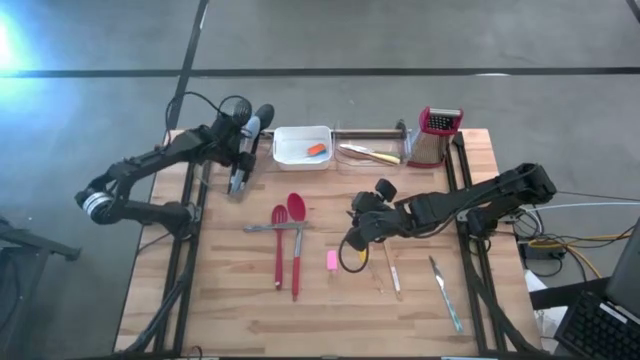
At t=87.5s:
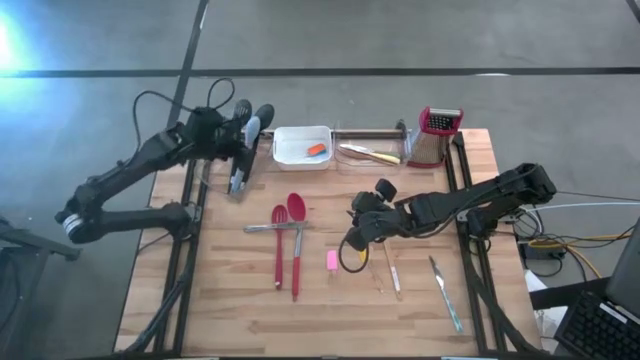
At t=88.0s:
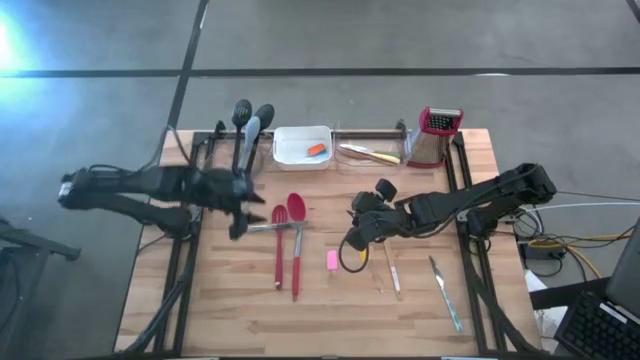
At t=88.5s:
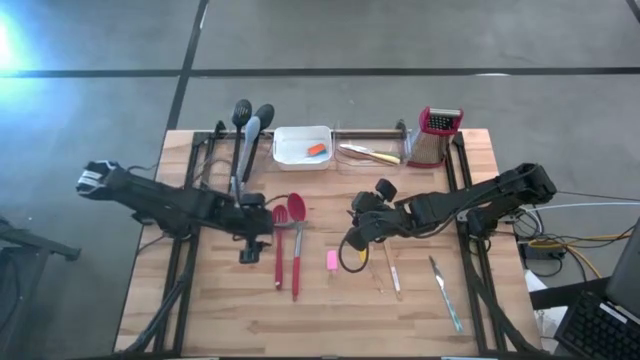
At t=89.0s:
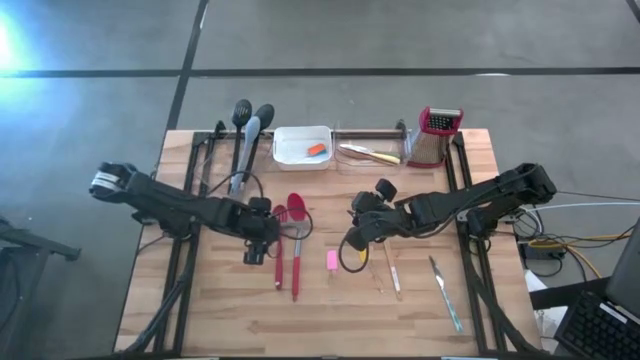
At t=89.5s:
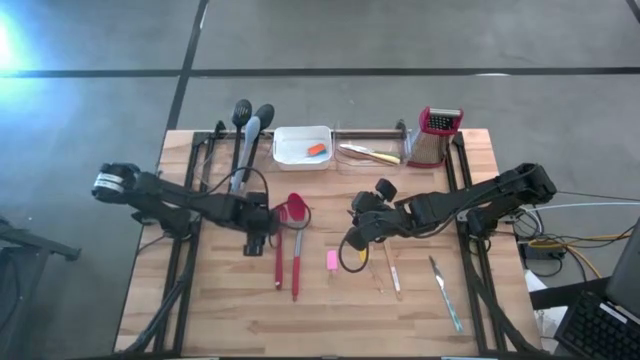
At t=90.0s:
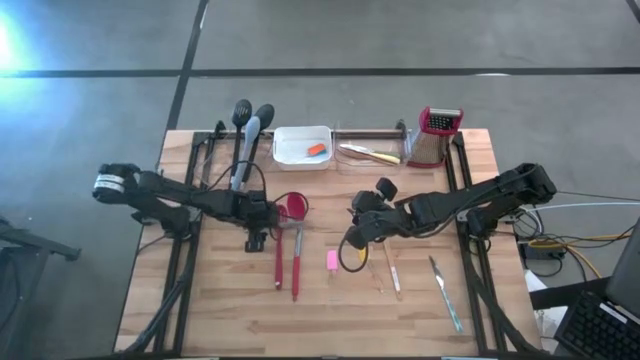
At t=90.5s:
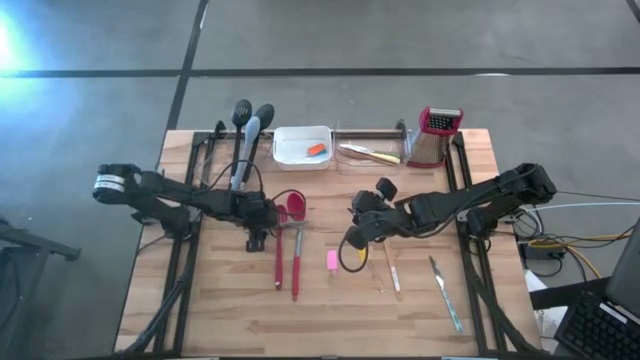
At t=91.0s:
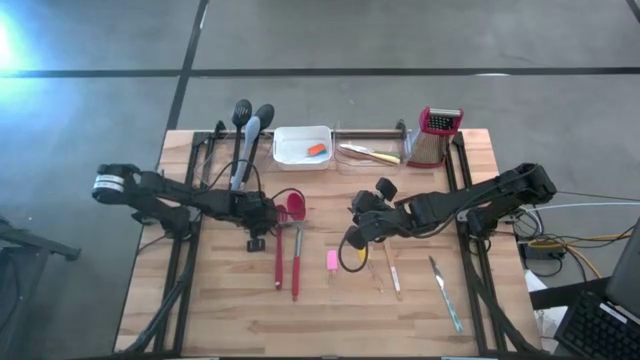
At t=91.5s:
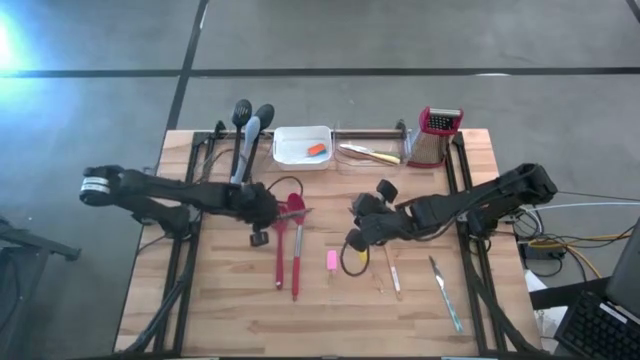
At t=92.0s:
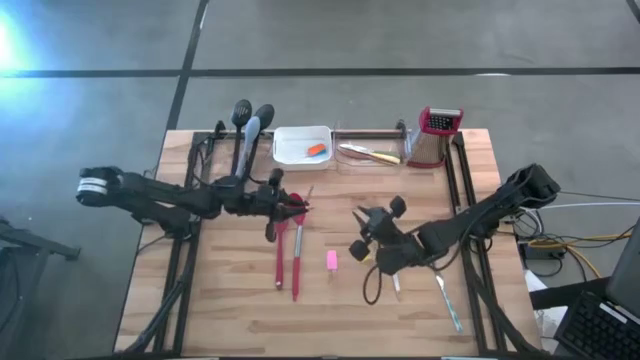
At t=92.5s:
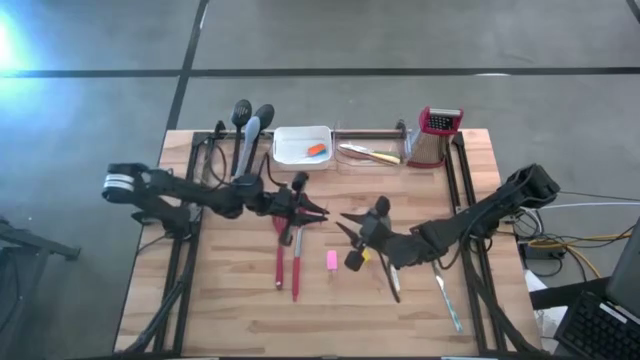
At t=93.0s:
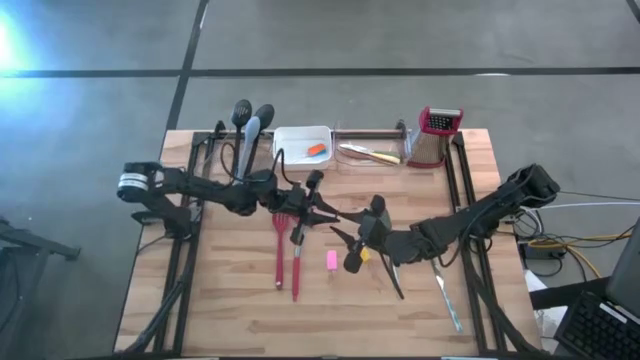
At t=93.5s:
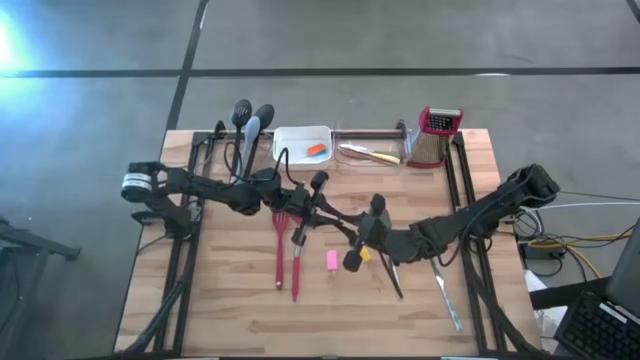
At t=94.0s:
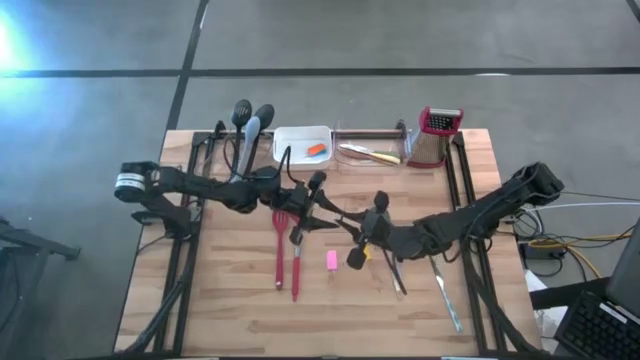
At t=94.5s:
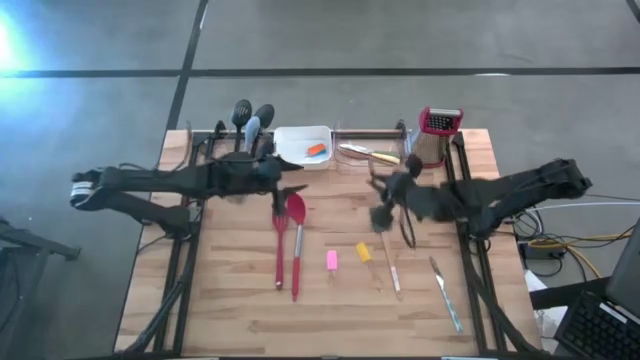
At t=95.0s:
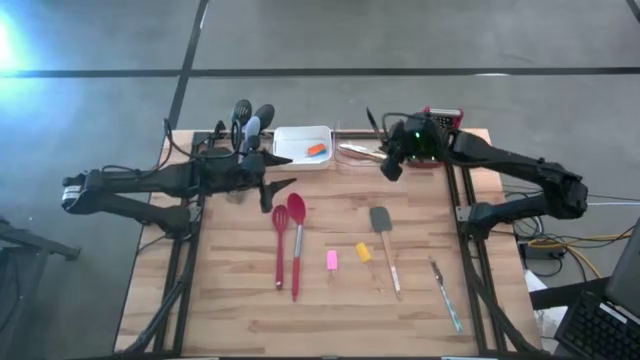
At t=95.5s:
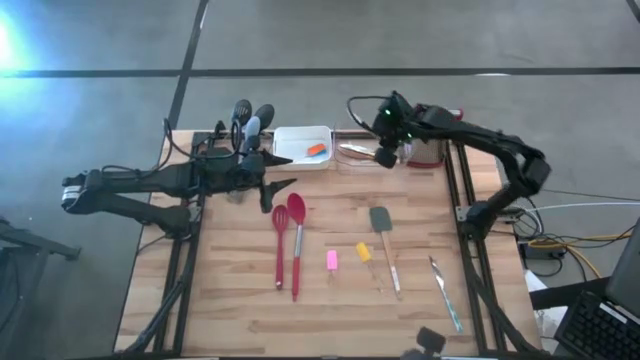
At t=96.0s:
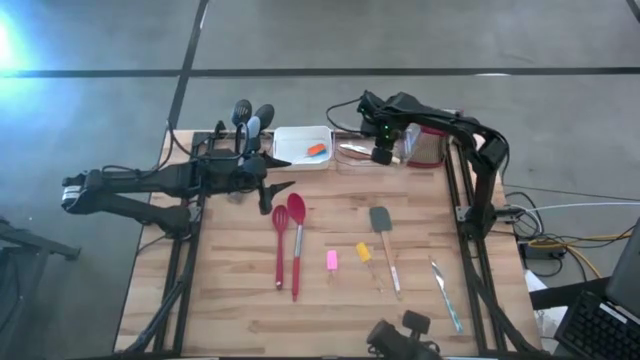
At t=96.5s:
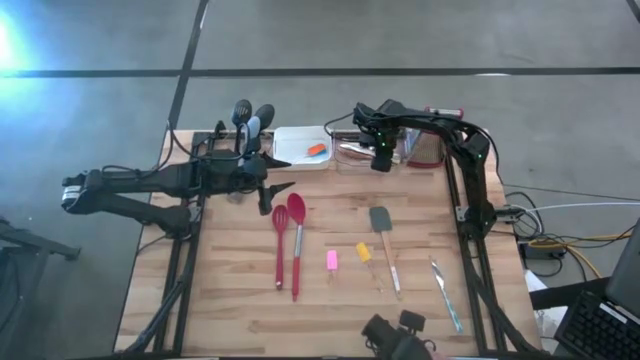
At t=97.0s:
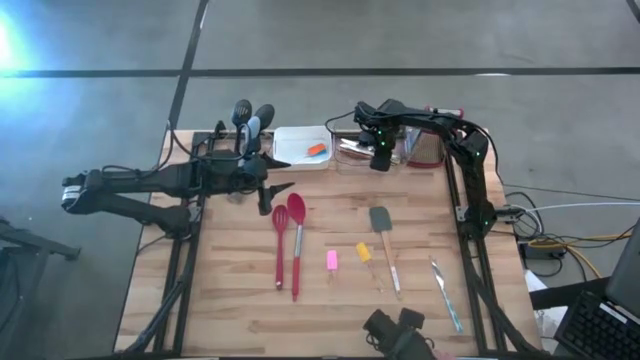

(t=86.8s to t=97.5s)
Task: Pick & Place Kitchen Items
Put the silver knife into the right transparent bin

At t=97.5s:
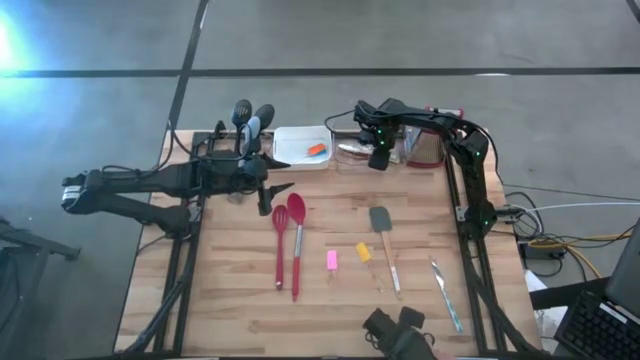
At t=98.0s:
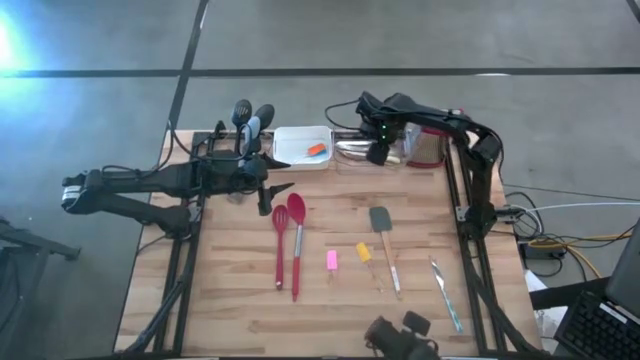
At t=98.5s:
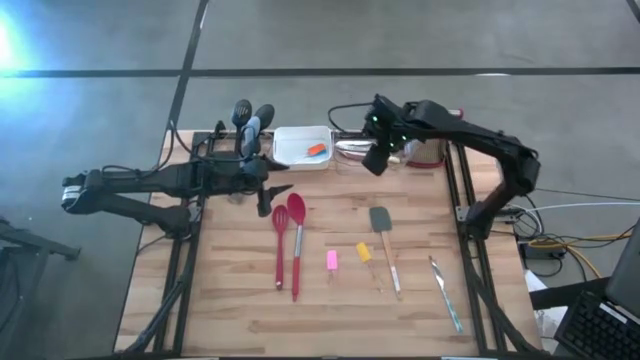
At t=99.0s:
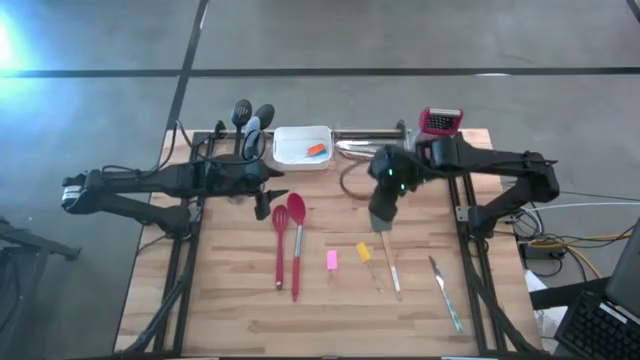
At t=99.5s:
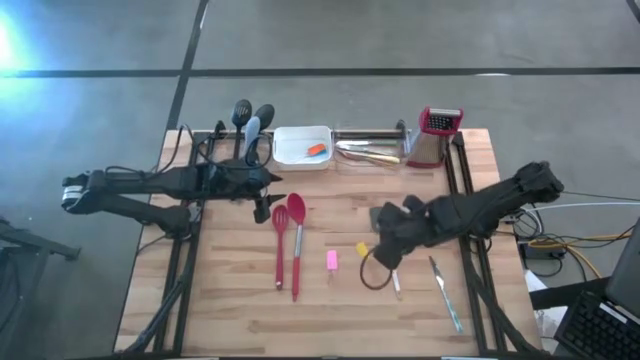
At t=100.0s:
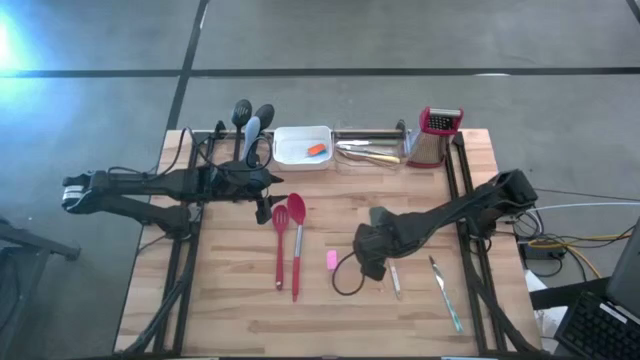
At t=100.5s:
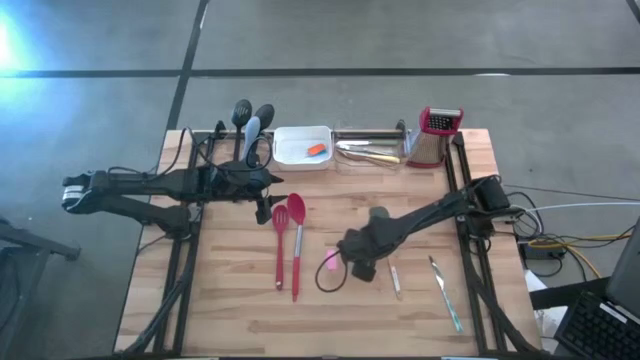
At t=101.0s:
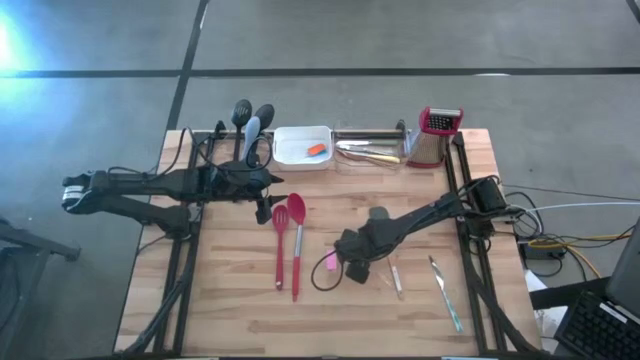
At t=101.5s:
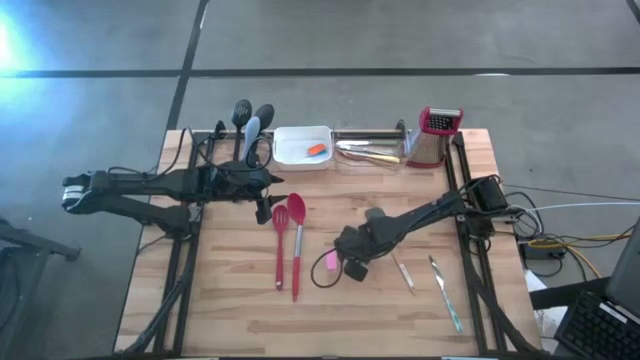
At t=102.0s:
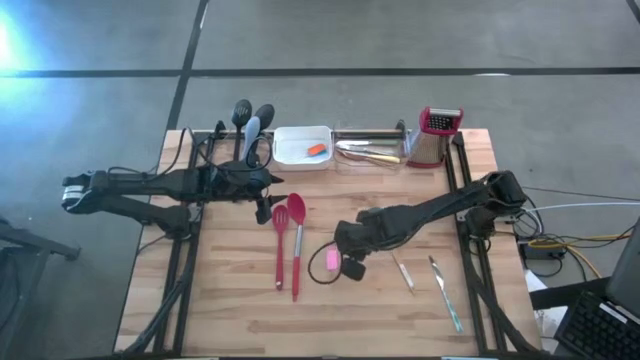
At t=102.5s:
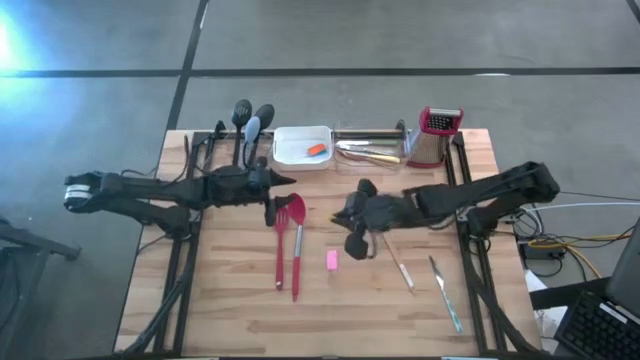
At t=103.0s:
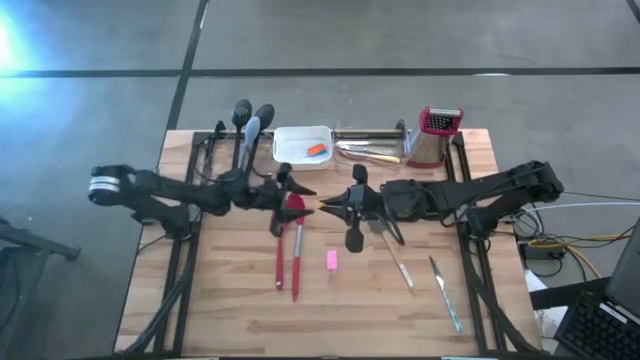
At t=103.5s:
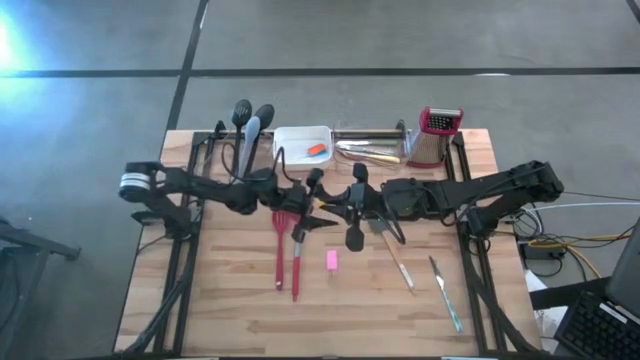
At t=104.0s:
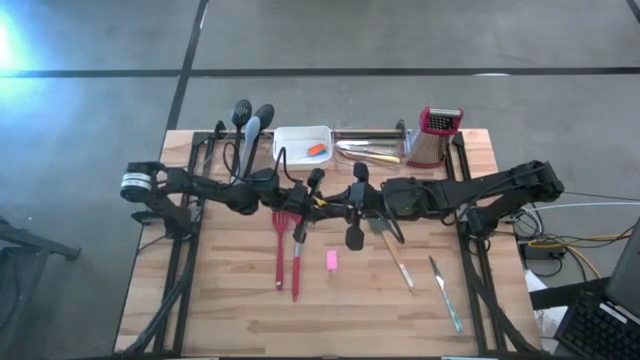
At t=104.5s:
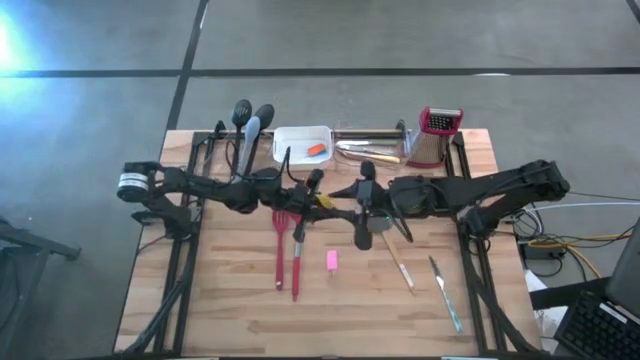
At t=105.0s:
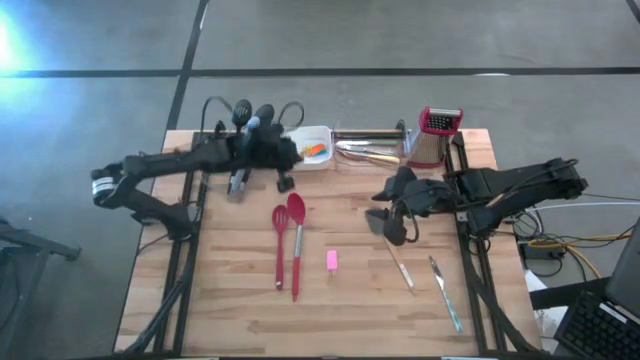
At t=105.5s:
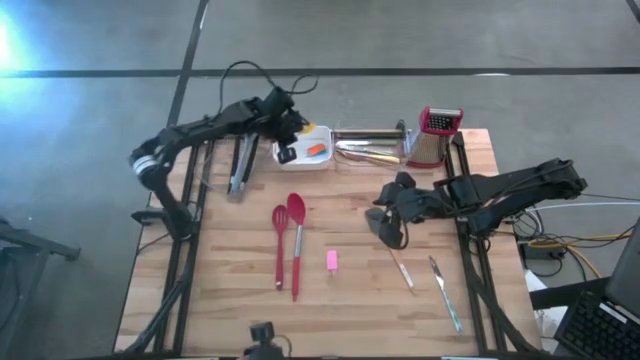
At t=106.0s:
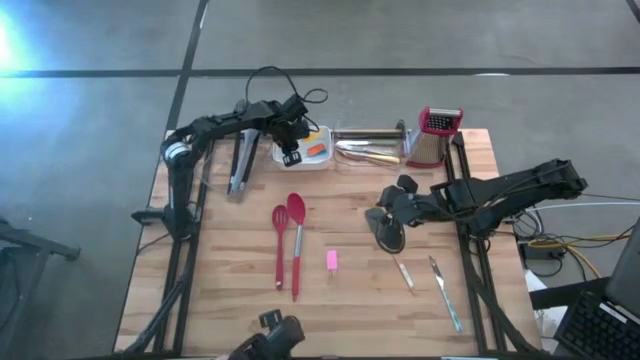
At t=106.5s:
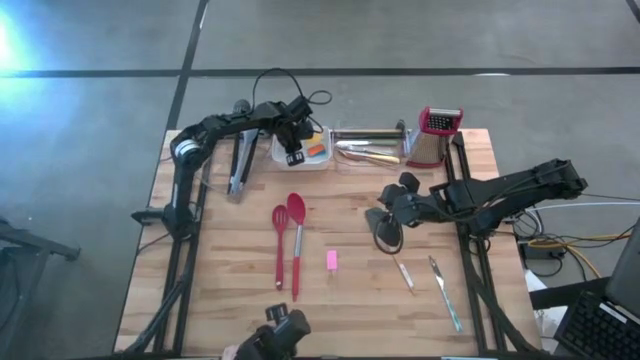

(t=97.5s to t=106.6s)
Put the yellow spatula into the white bin
